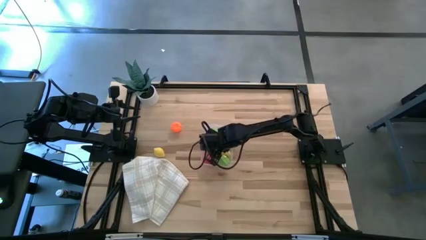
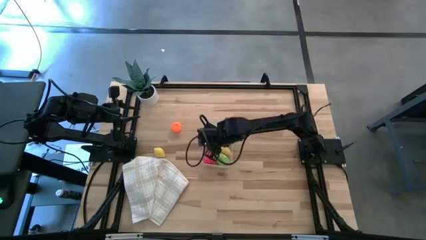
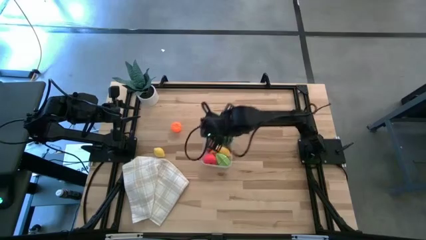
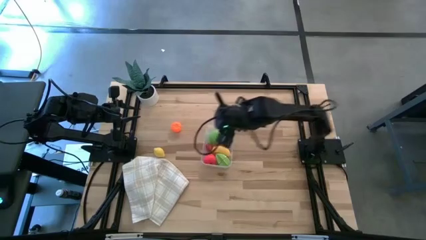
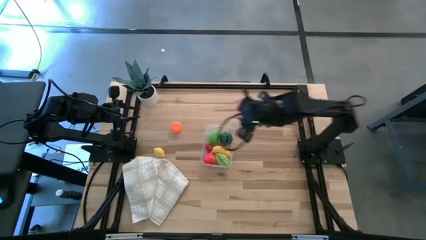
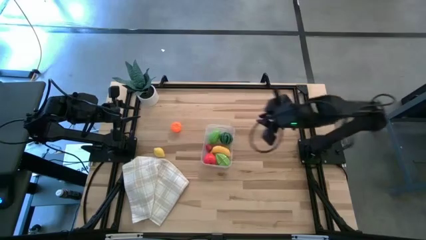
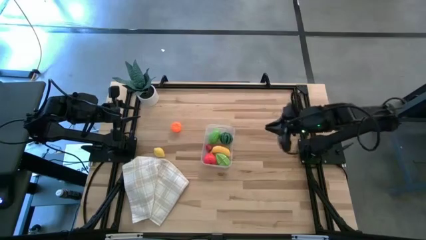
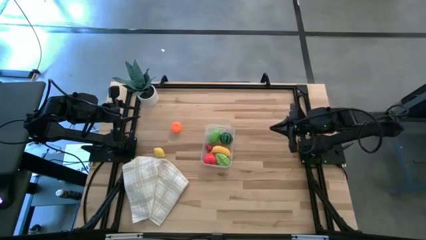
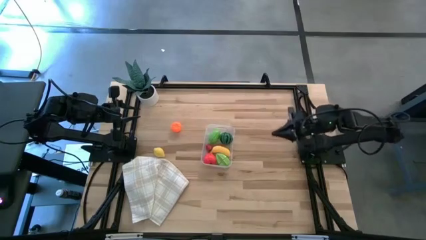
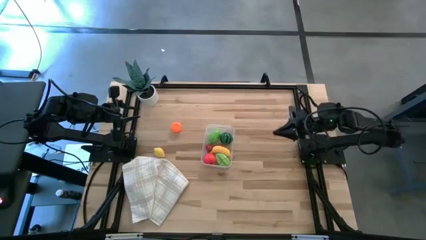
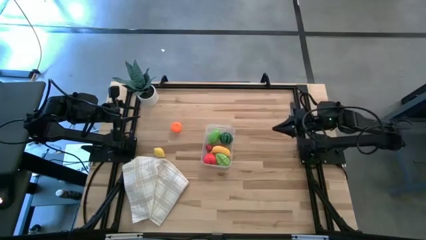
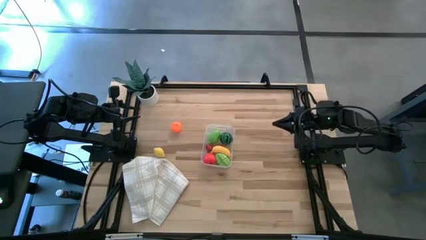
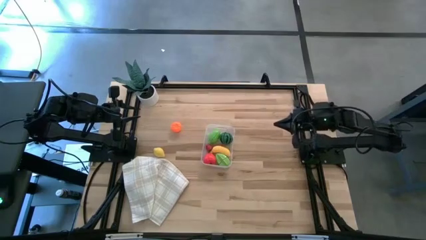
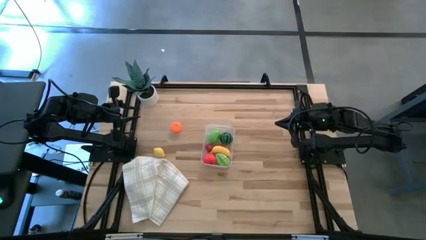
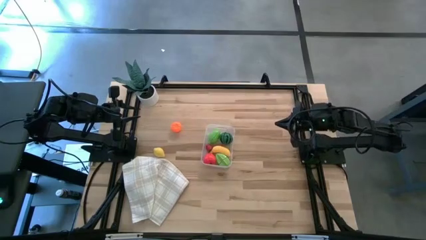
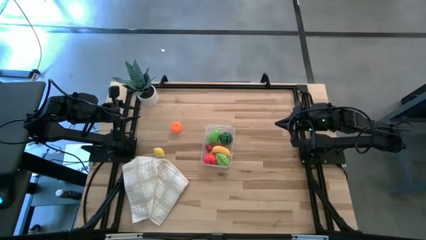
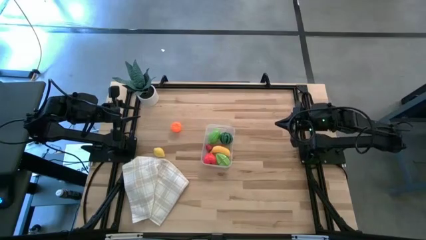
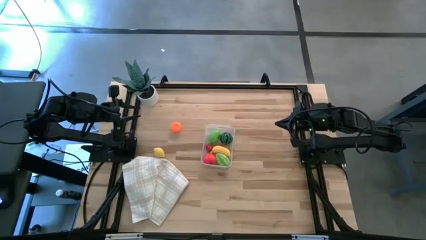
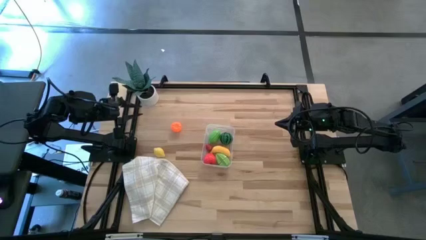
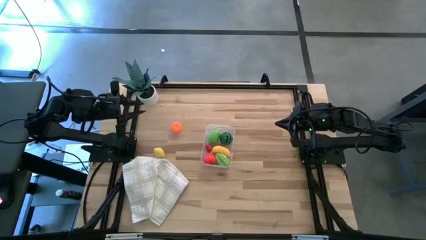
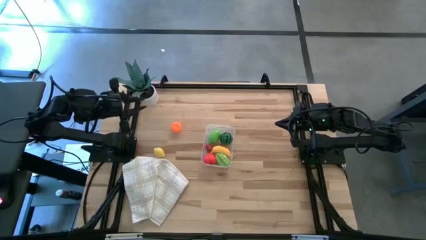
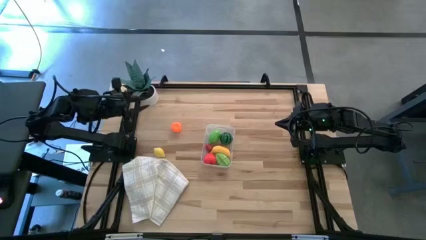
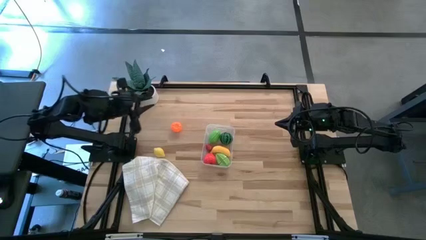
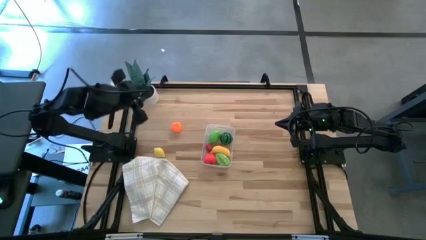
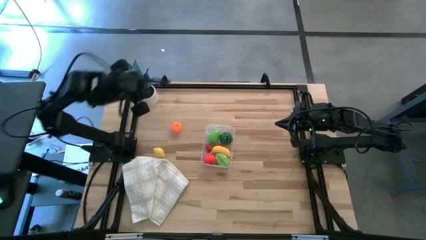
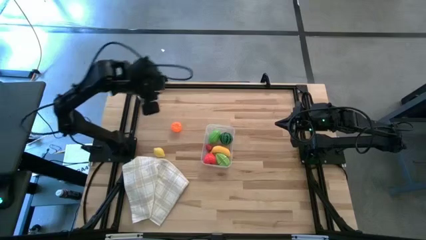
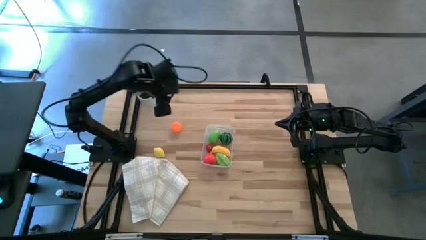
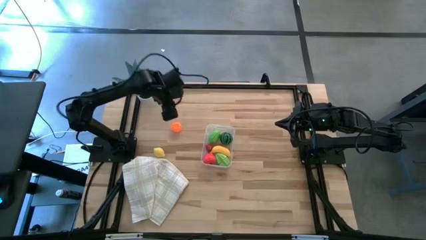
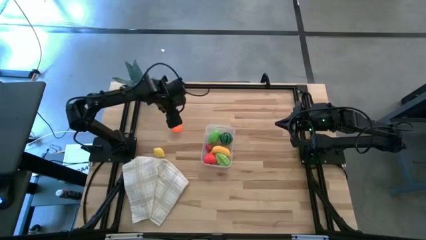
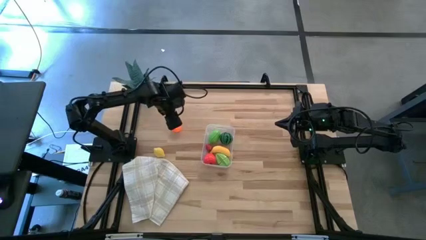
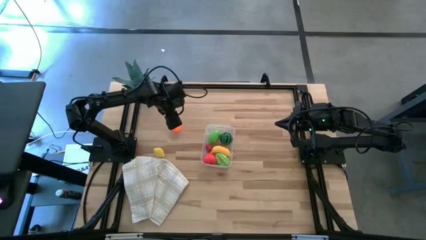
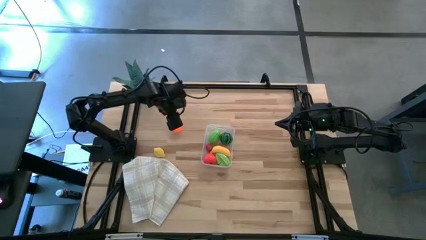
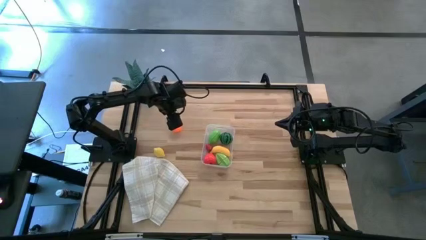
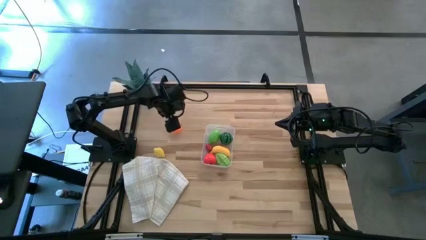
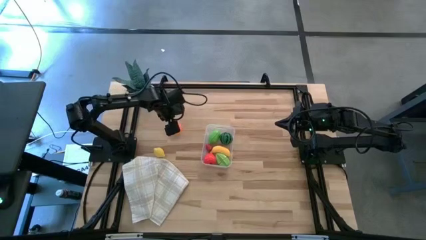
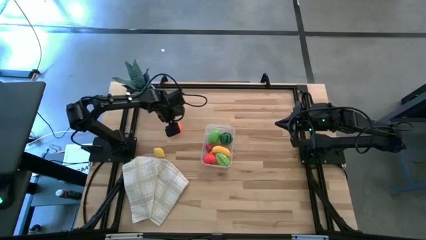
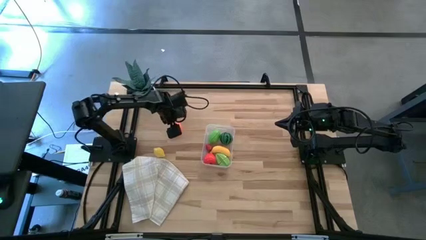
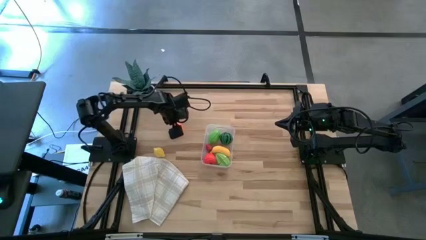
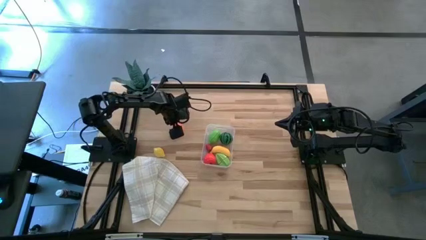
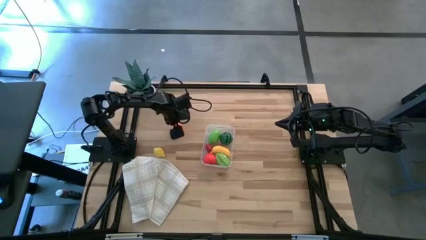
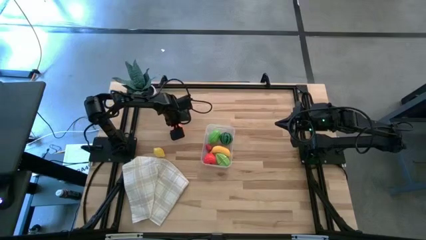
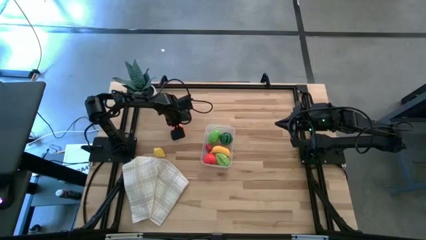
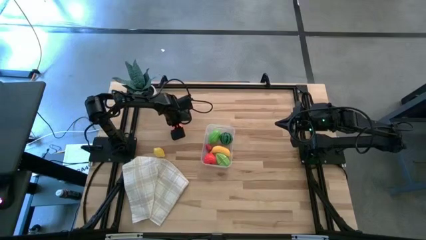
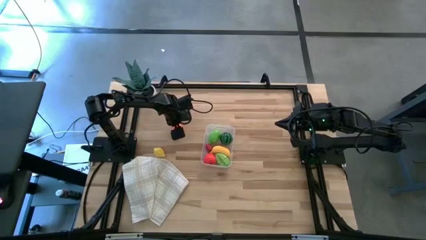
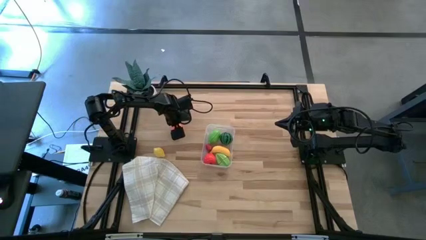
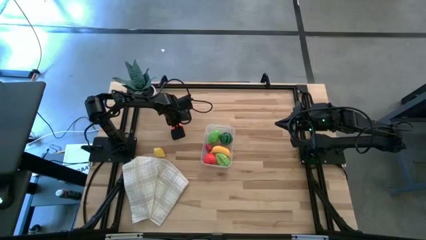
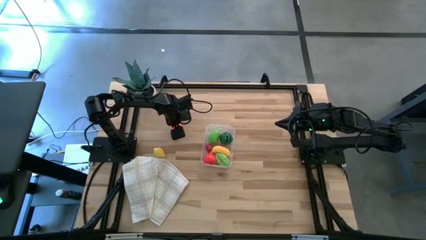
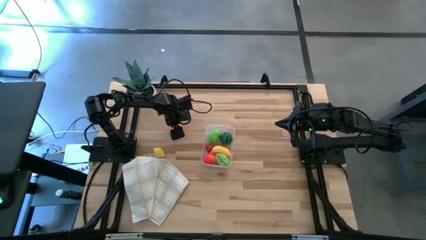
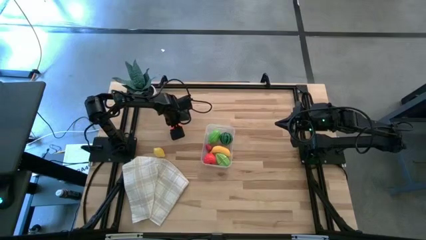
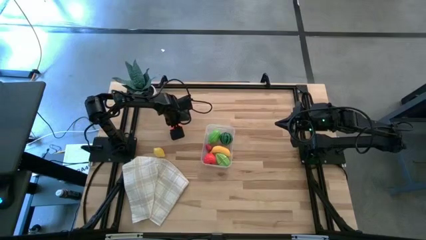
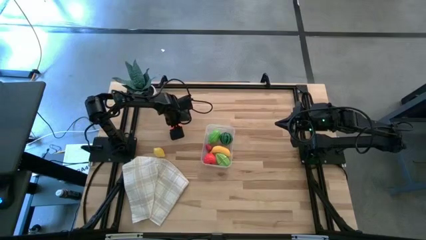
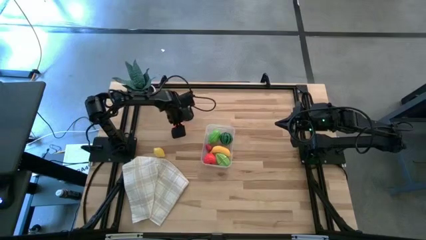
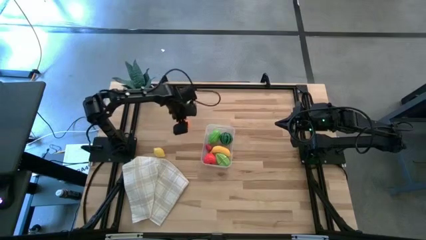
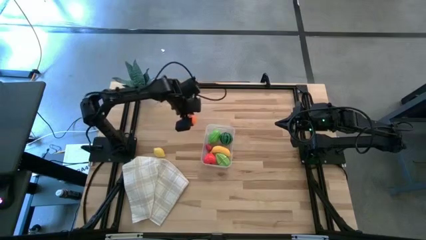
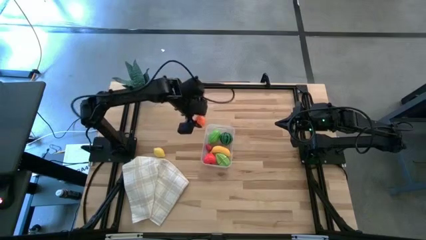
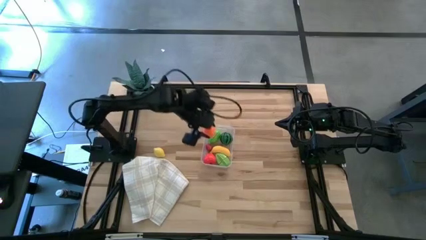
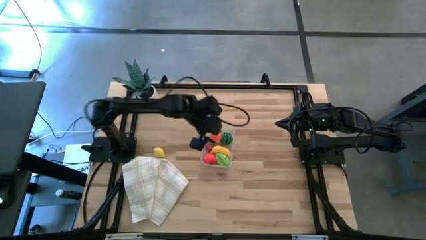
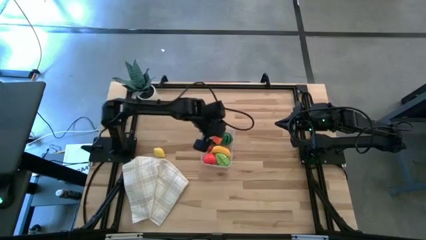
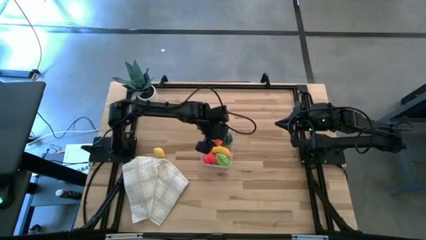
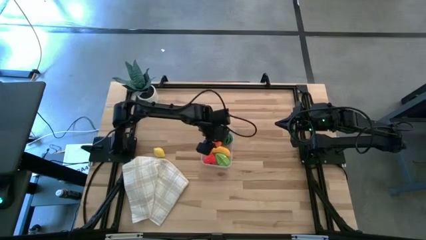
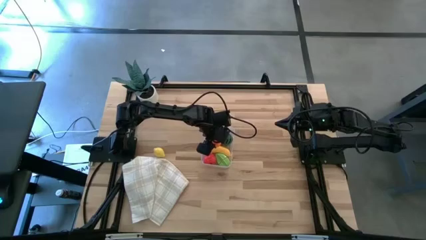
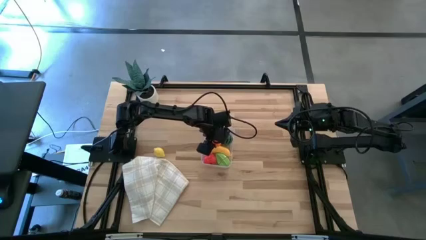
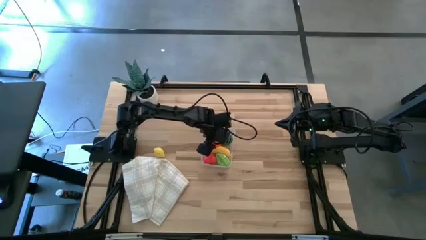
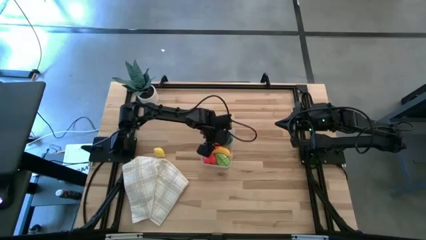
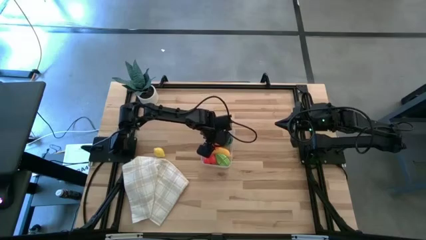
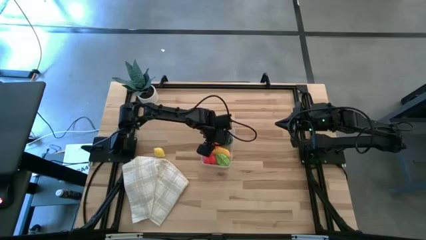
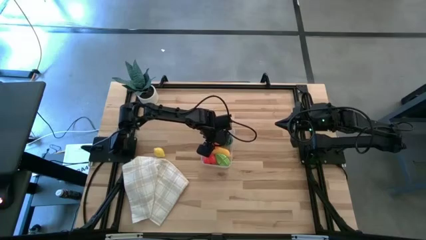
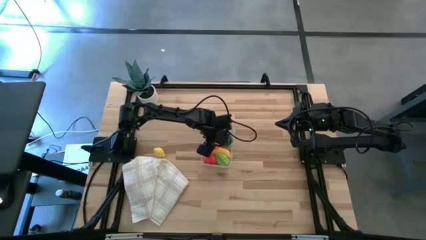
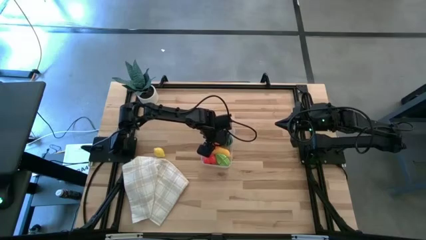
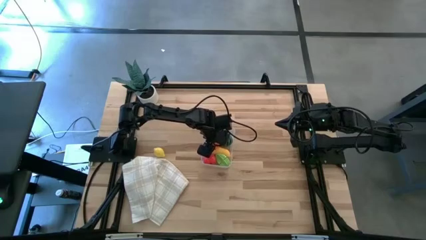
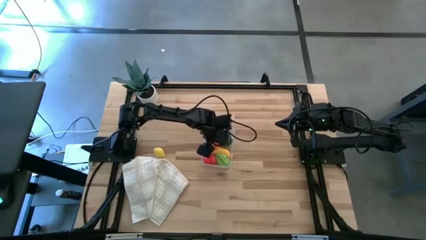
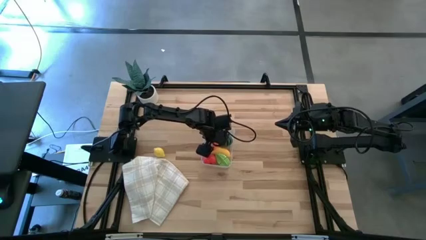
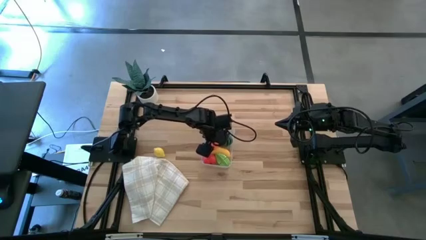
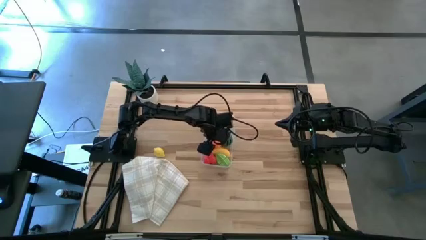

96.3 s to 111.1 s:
Task: Pick and placing Produce into tupperware
Put the tangerine into the transparent bin

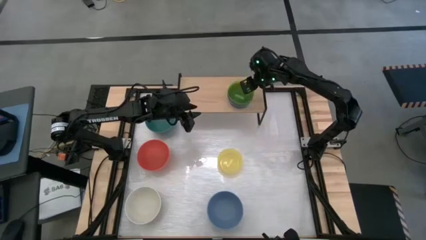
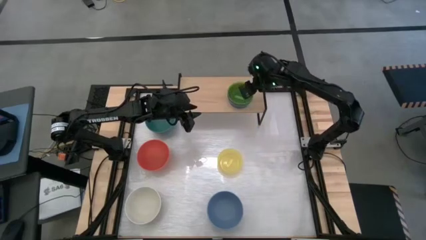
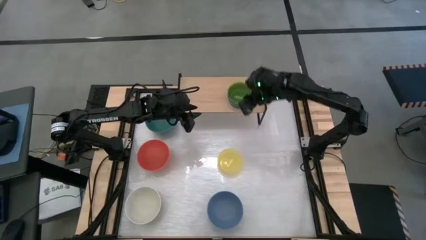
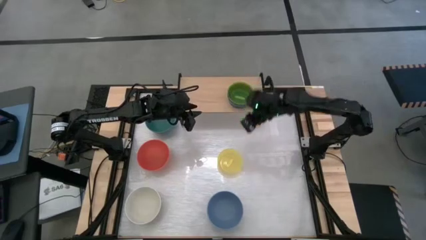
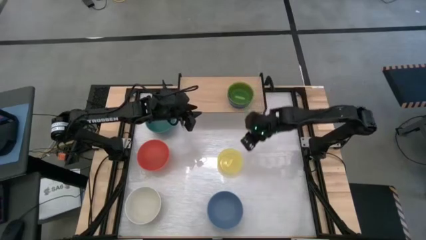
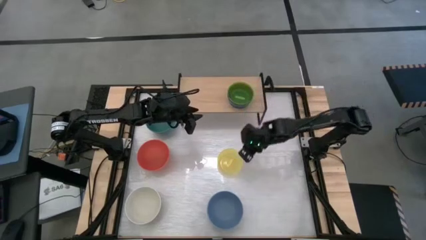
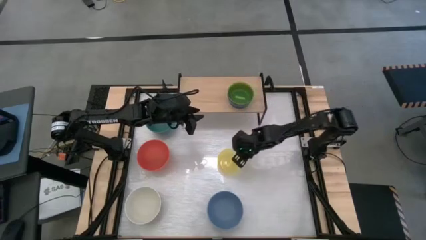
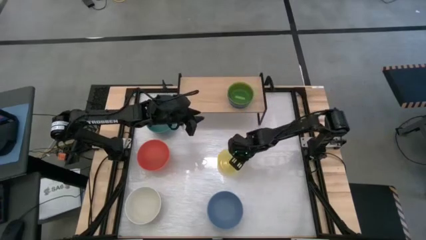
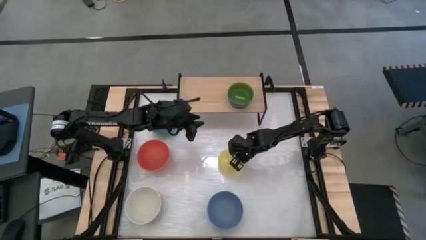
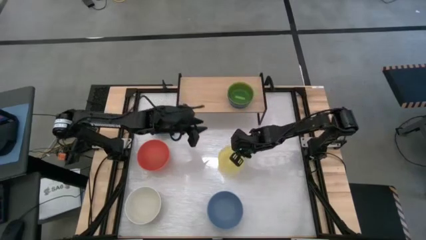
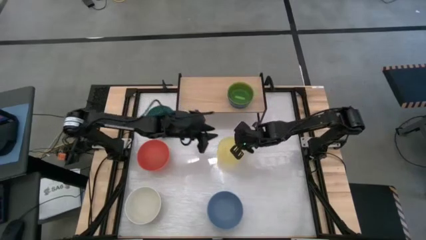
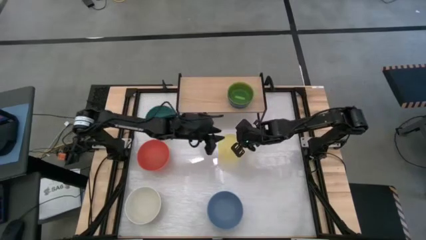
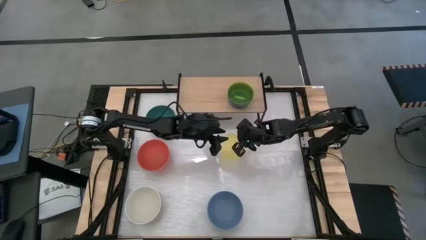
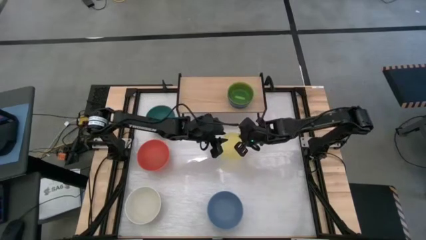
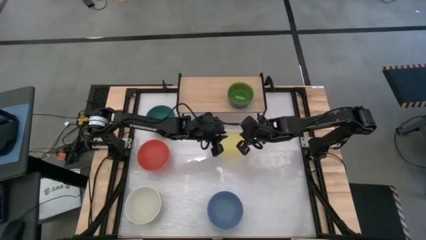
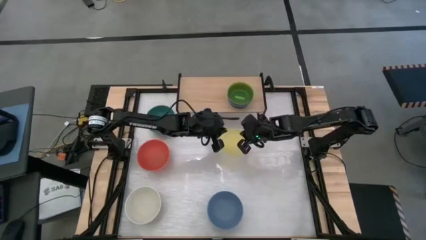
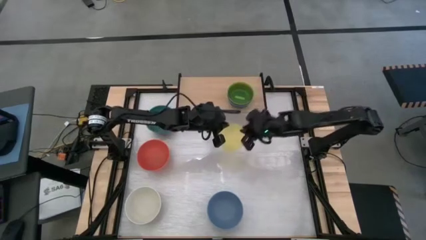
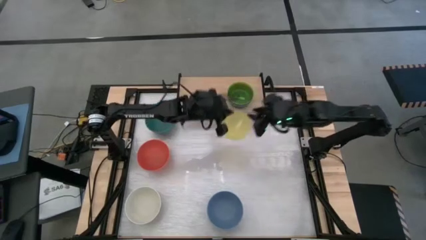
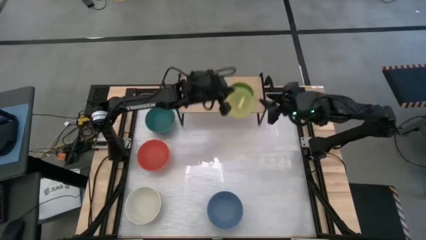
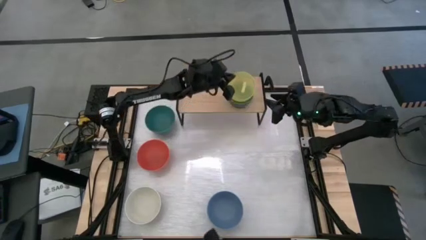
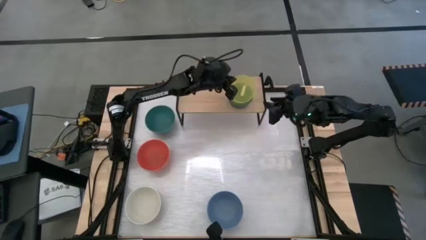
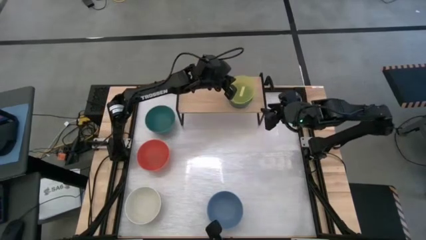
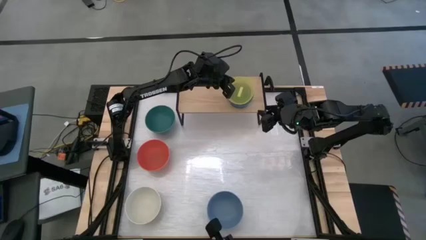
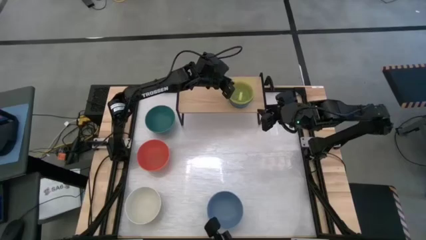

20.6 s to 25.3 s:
Task: Place and stack bowls onto a shelf
Stack the yellow bowl on top of the light green bowl on the shelf
